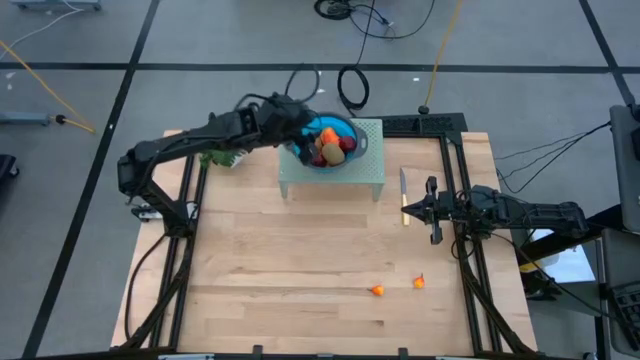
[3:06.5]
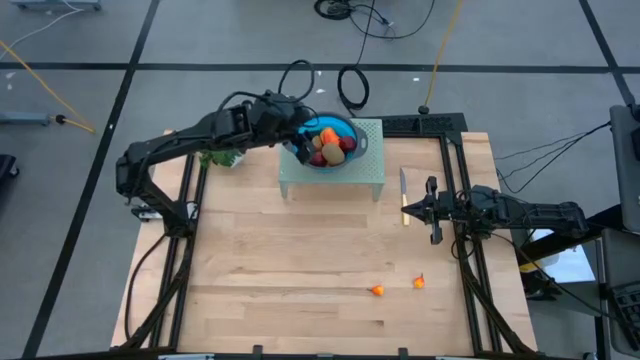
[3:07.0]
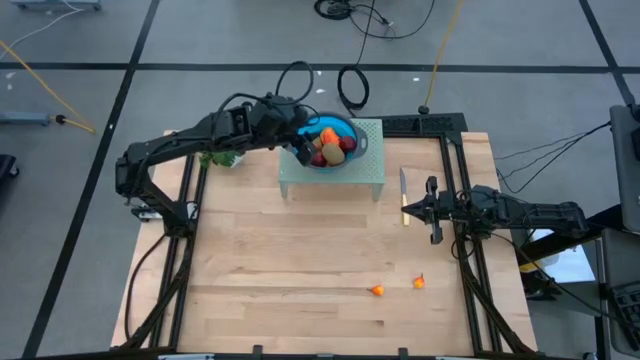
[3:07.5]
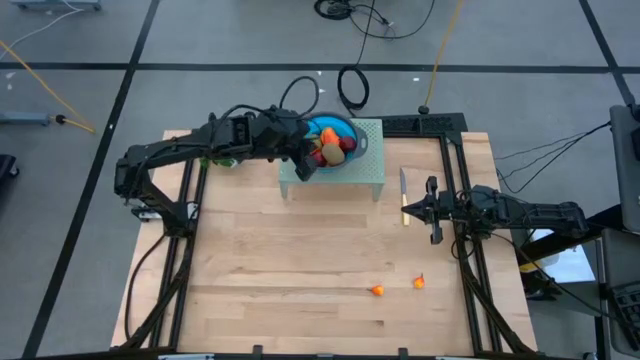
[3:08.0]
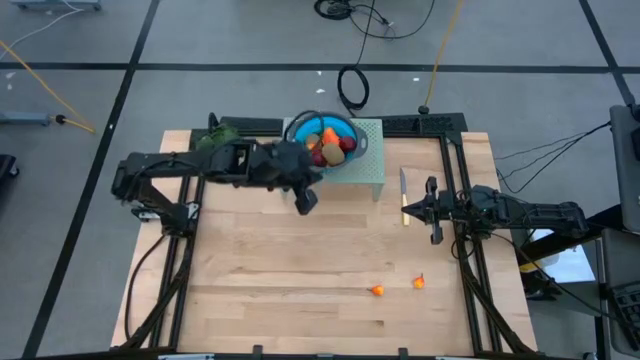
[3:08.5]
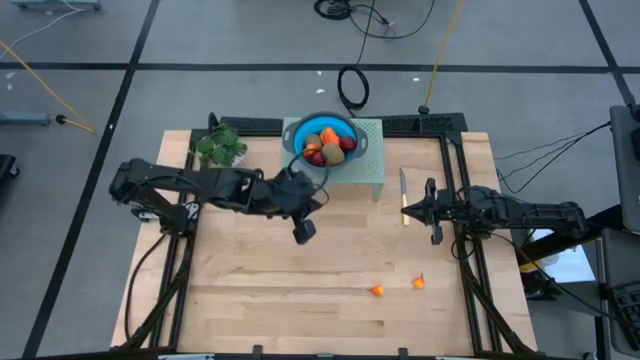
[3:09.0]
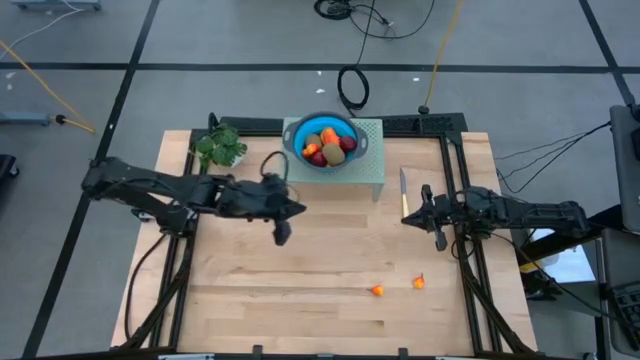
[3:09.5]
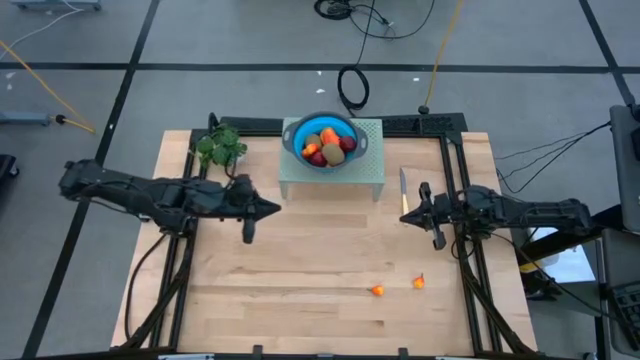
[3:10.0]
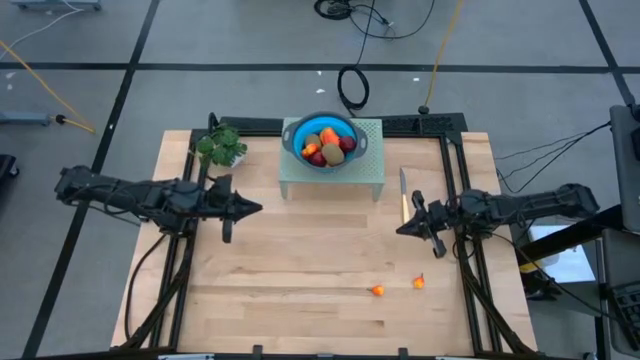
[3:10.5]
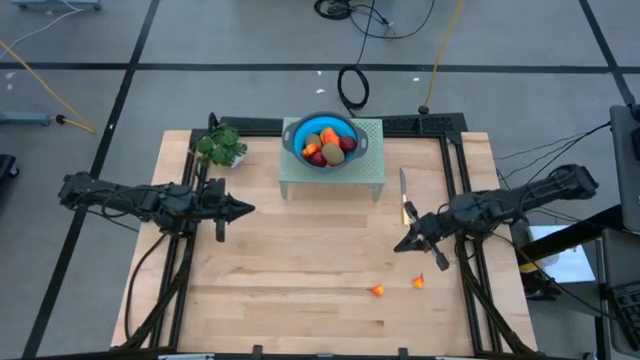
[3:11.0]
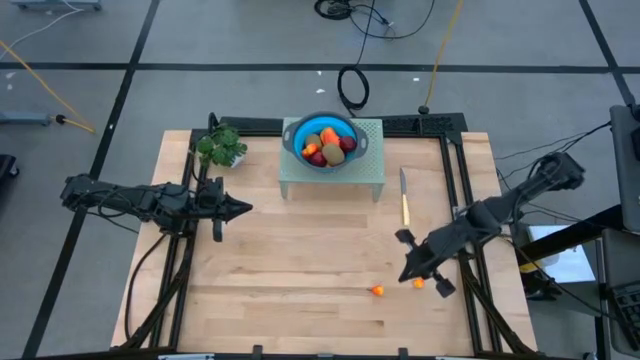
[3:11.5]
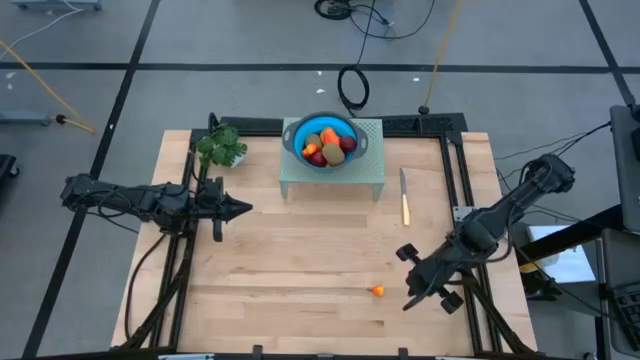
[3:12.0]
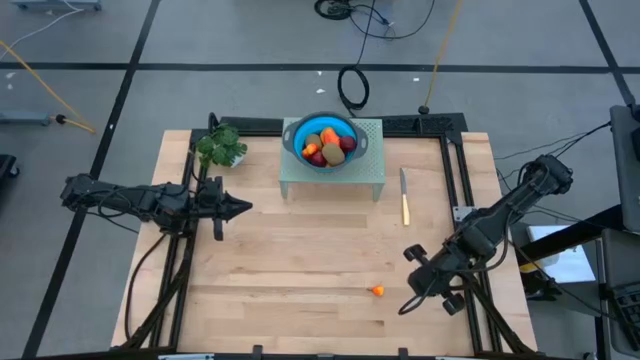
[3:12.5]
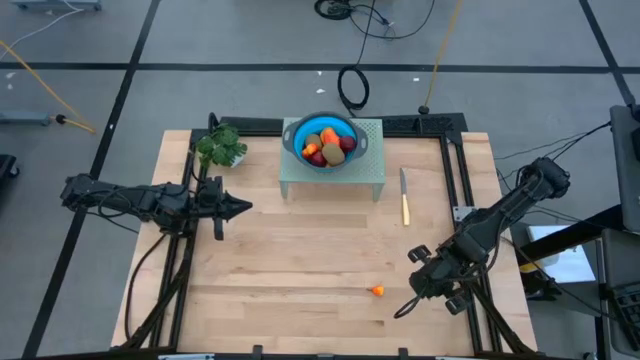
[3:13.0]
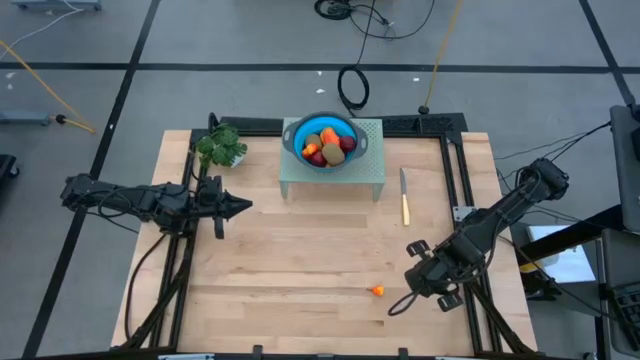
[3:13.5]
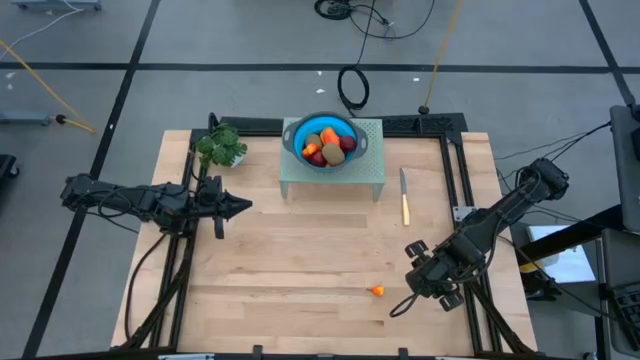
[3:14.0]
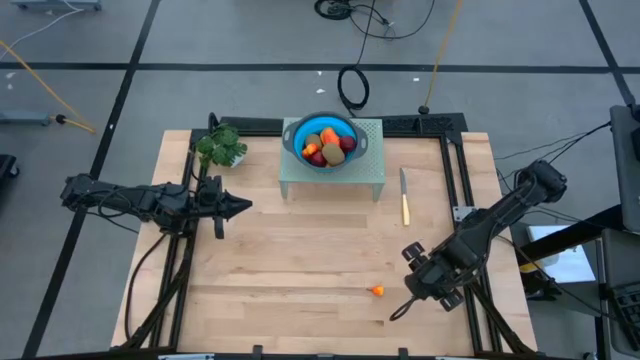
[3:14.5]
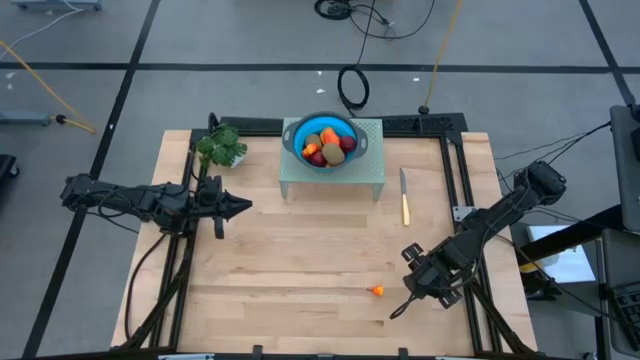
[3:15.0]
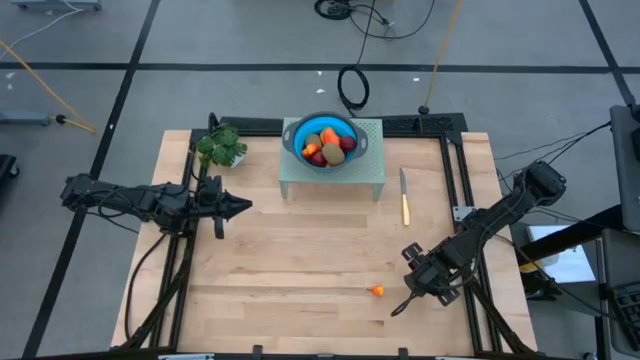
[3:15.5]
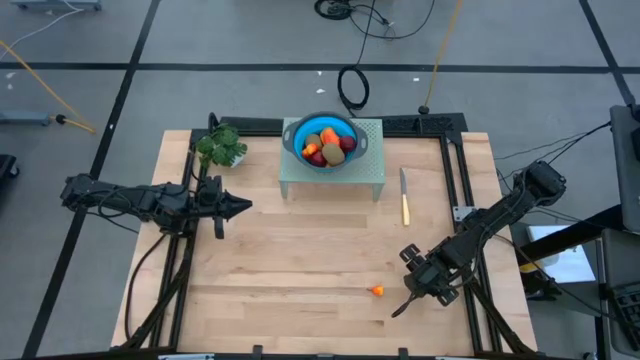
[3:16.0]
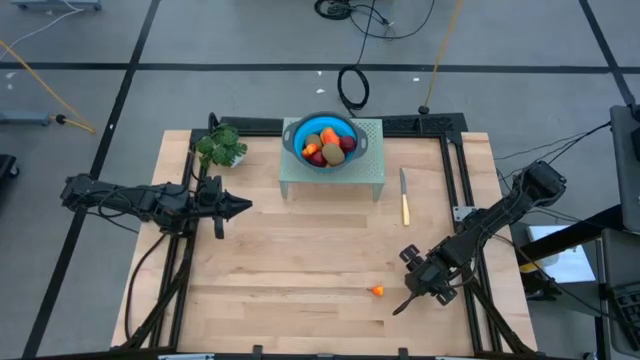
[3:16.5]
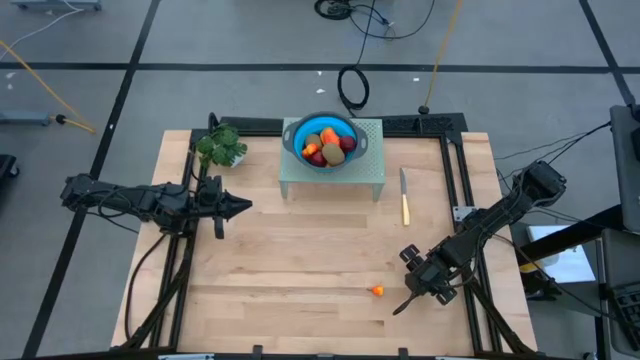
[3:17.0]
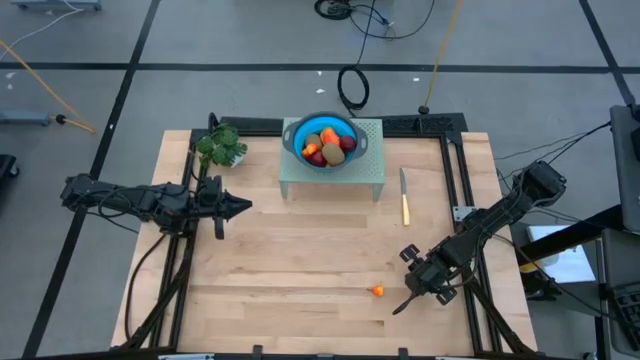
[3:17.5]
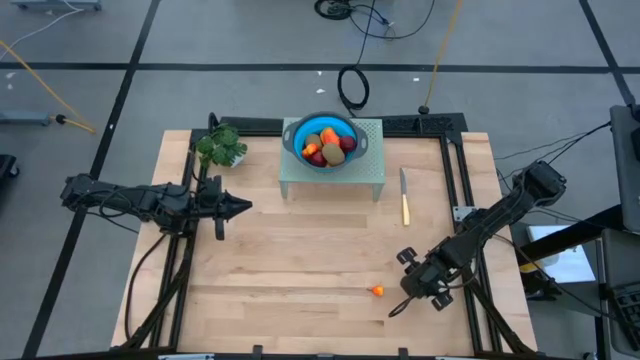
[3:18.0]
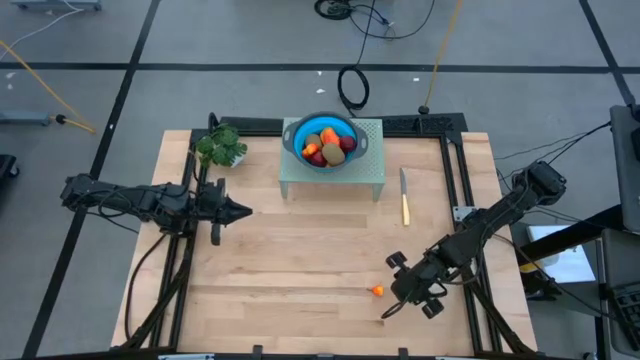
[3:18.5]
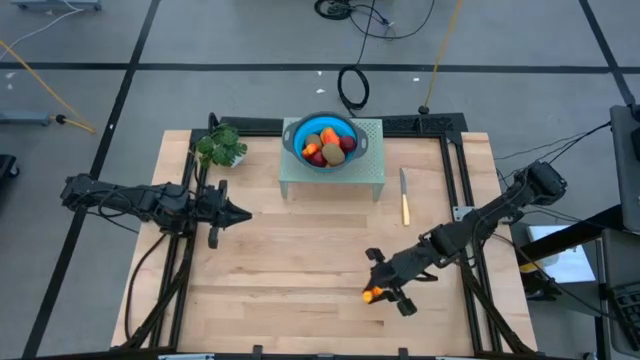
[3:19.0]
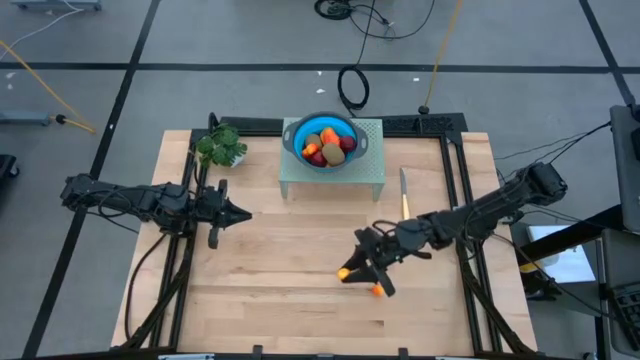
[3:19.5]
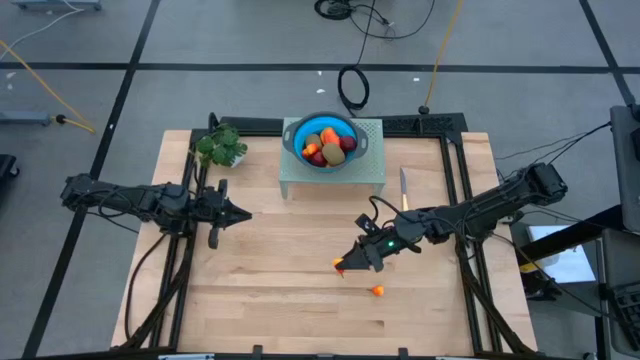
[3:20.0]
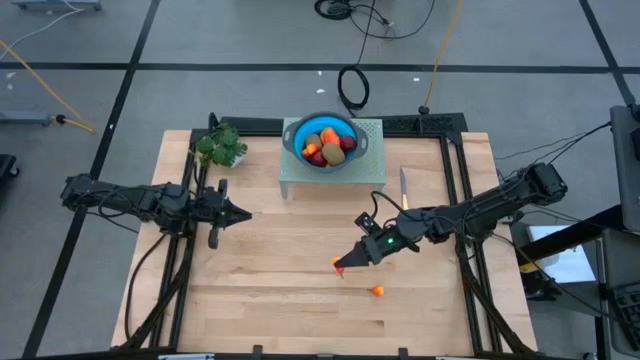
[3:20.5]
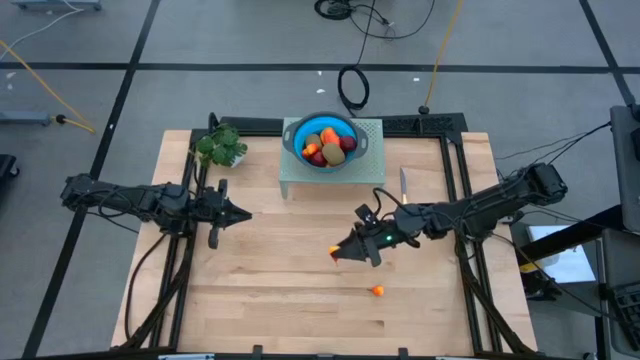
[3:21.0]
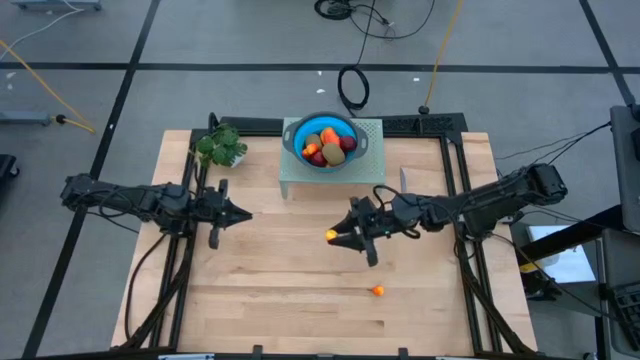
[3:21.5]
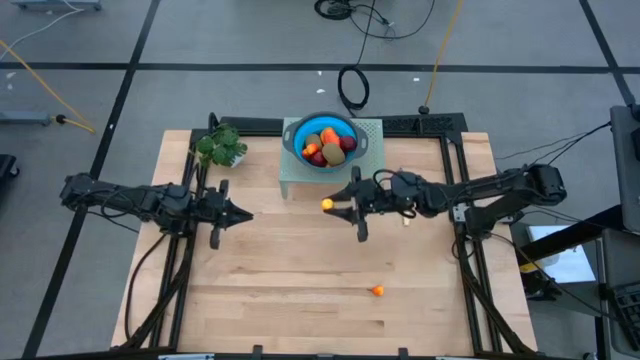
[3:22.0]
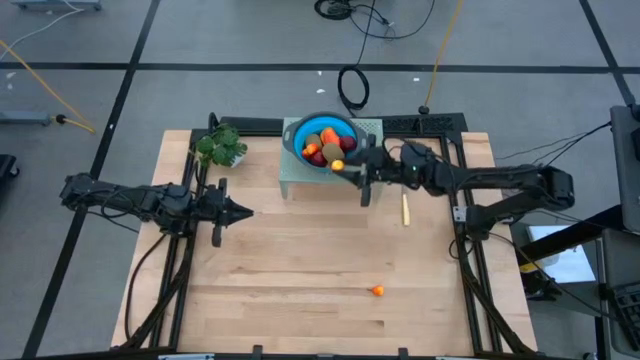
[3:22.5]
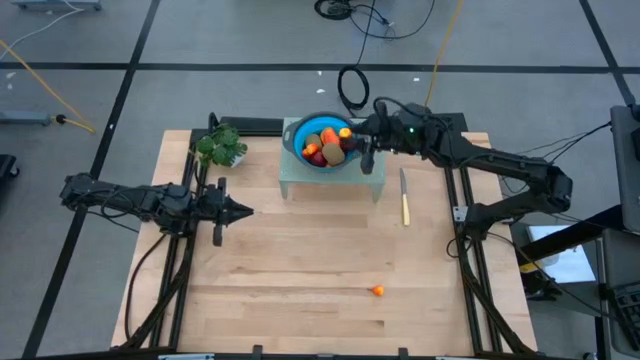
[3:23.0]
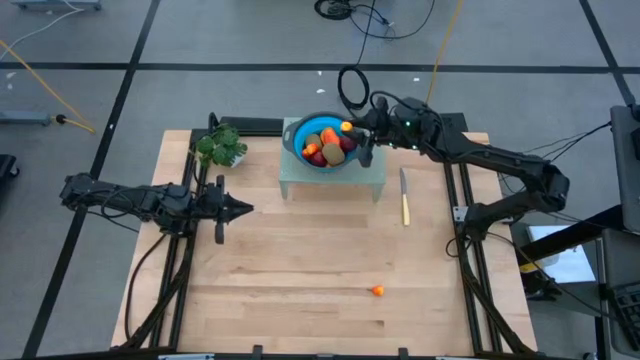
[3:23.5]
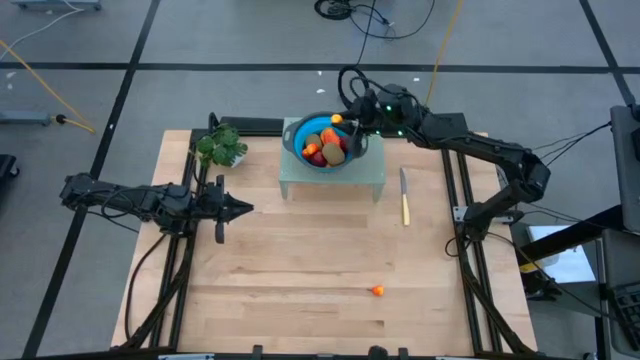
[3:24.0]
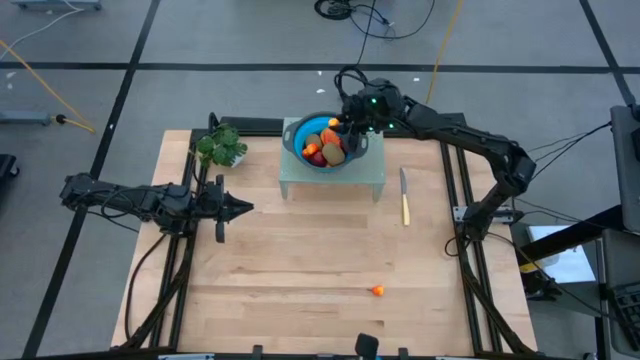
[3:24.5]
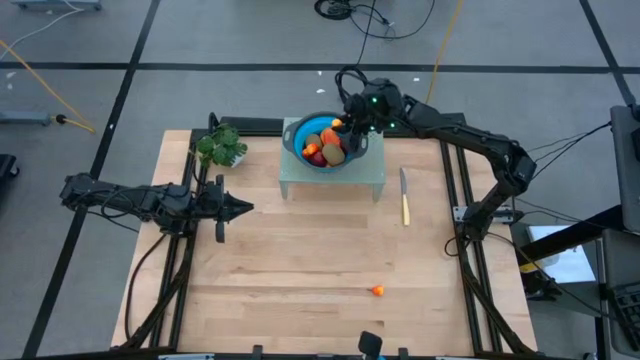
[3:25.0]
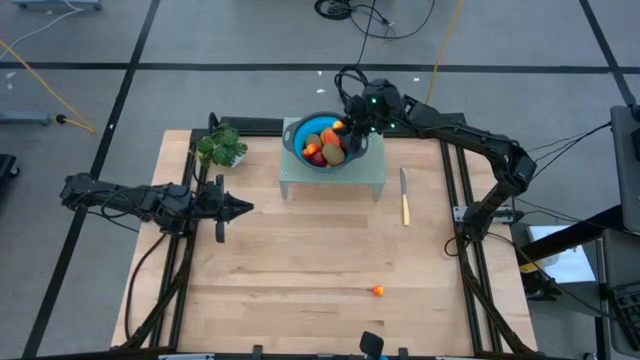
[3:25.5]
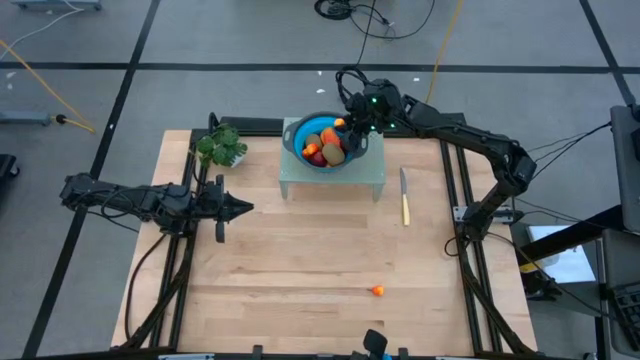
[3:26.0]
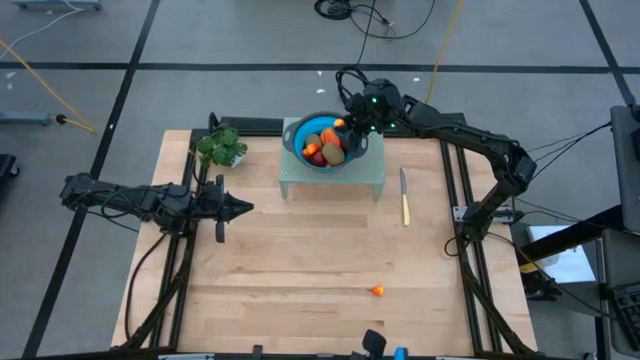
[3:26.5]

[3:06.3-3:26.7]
Task: Pick & Place Fruit
Put the peach into the colander on the shelf
